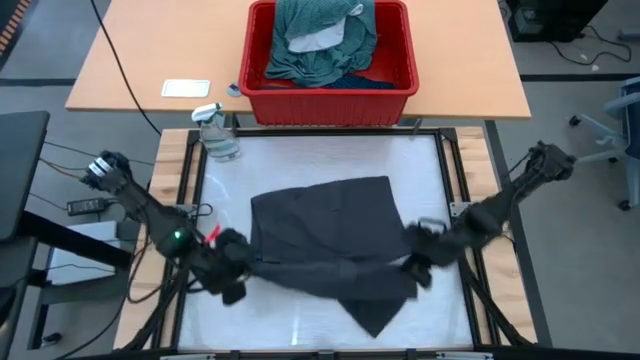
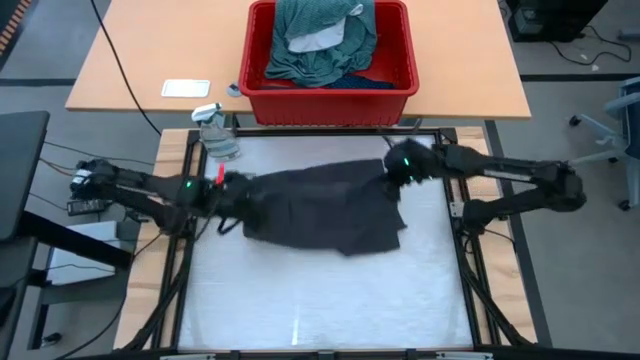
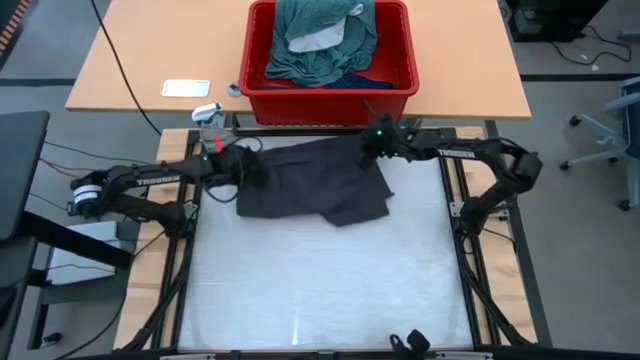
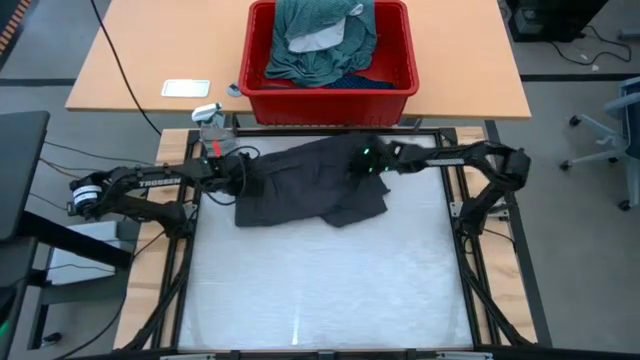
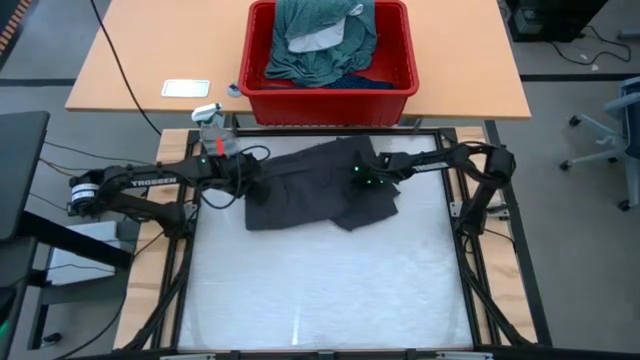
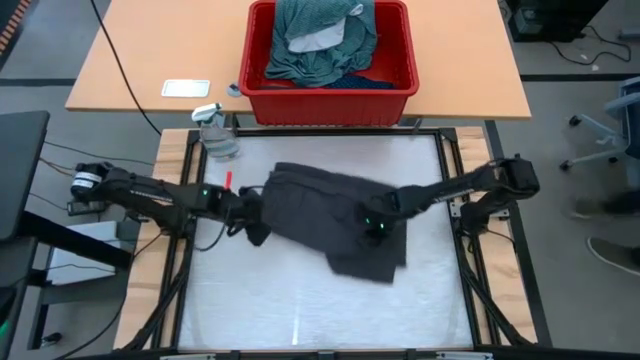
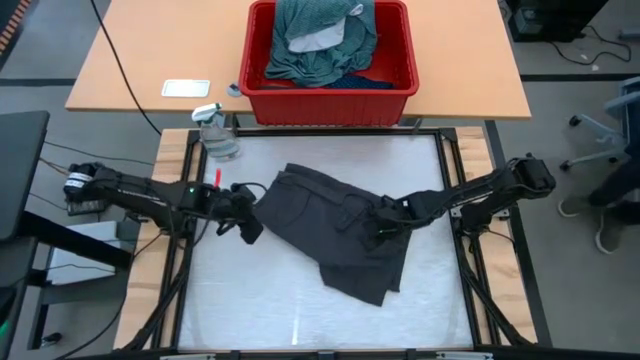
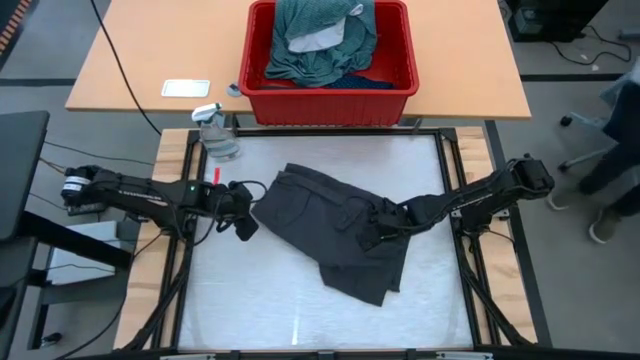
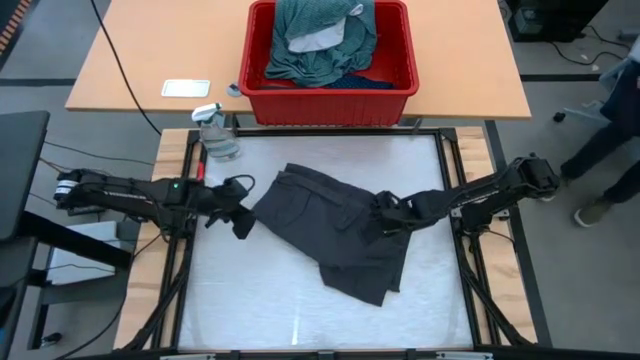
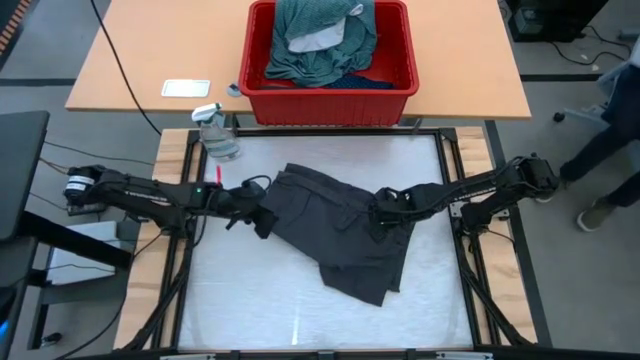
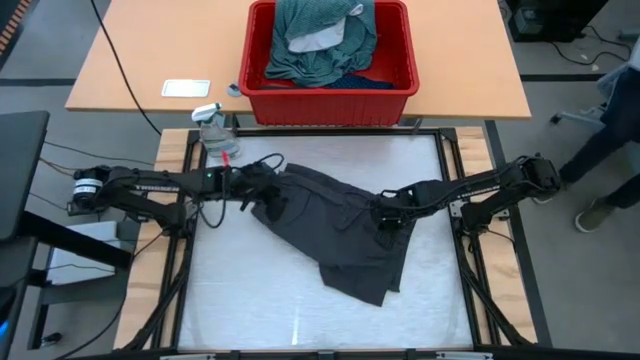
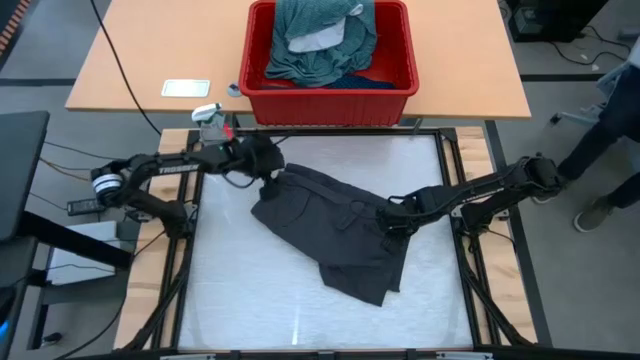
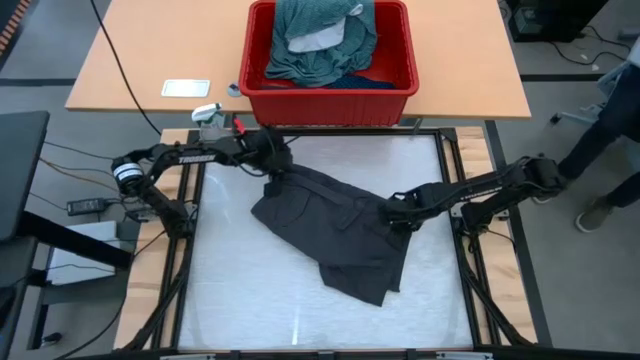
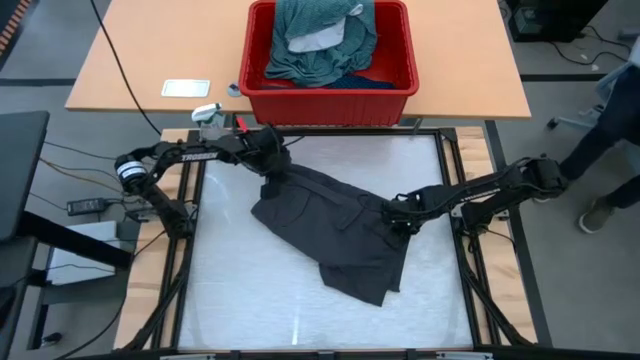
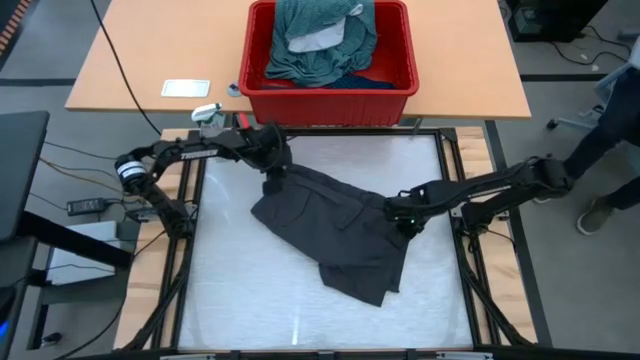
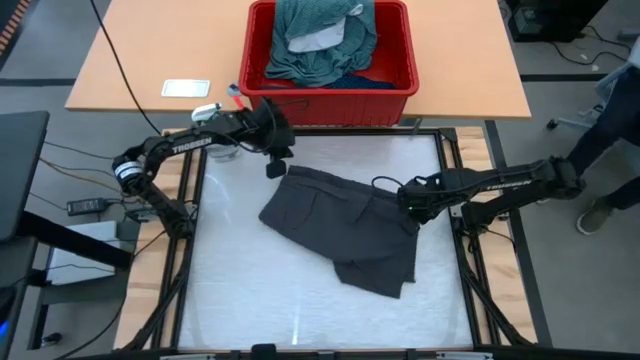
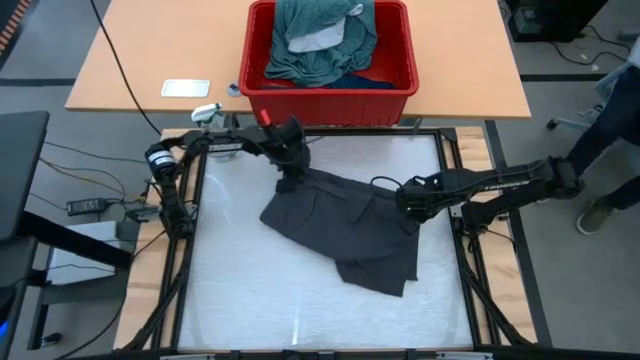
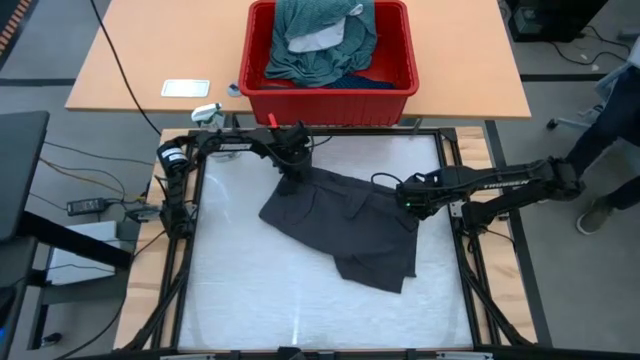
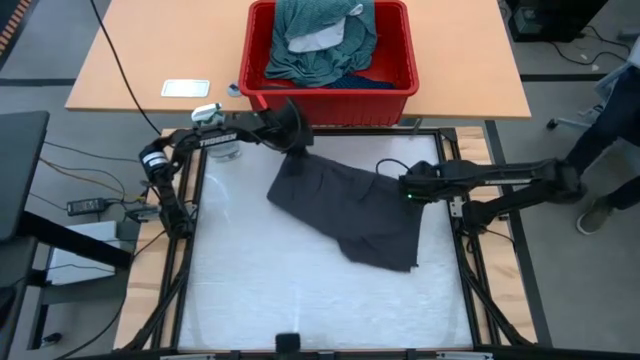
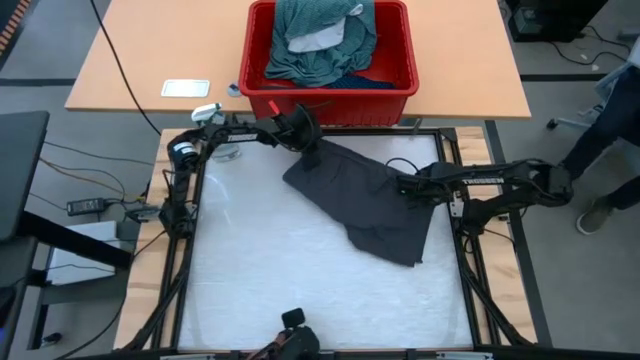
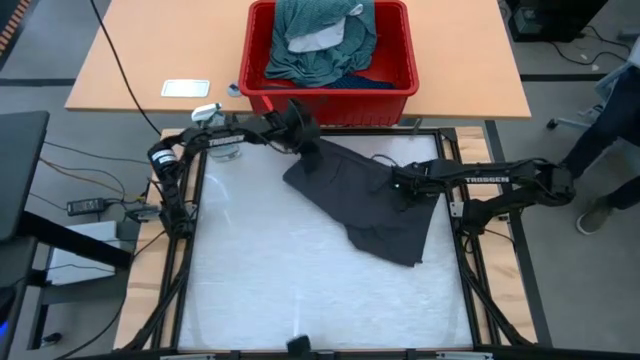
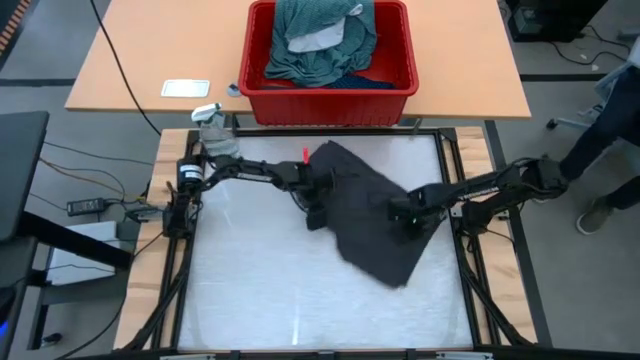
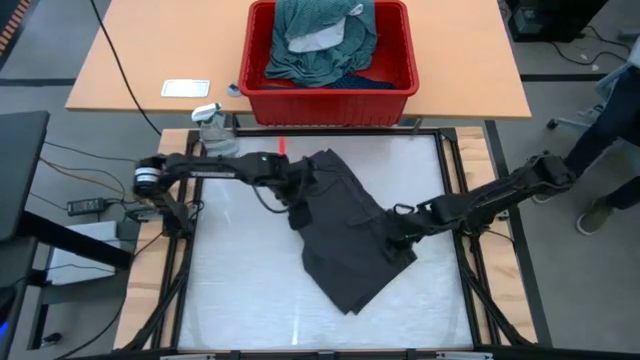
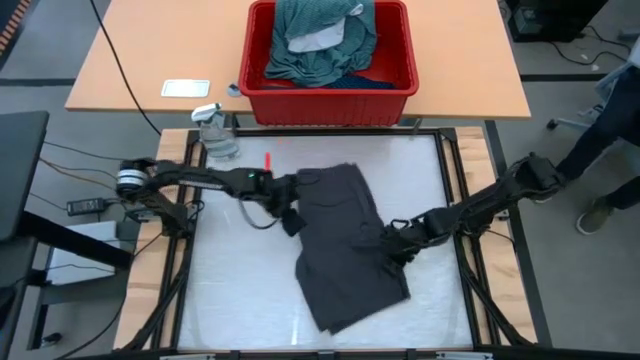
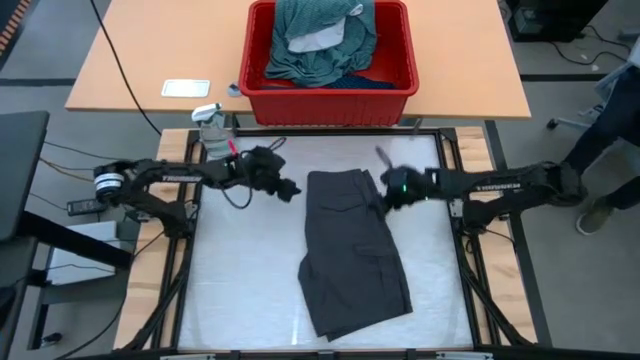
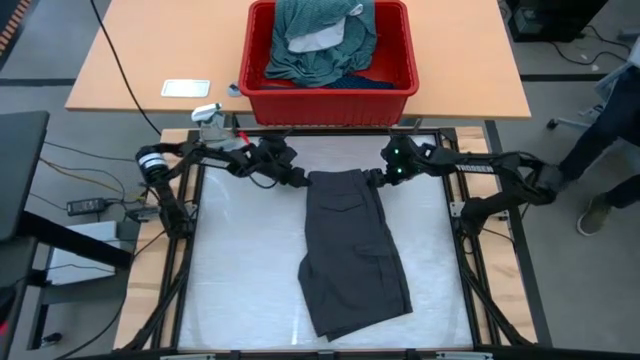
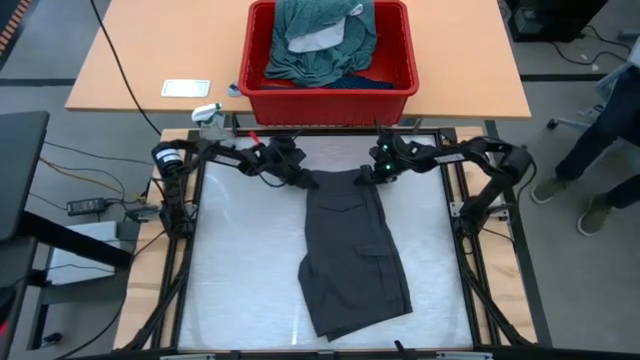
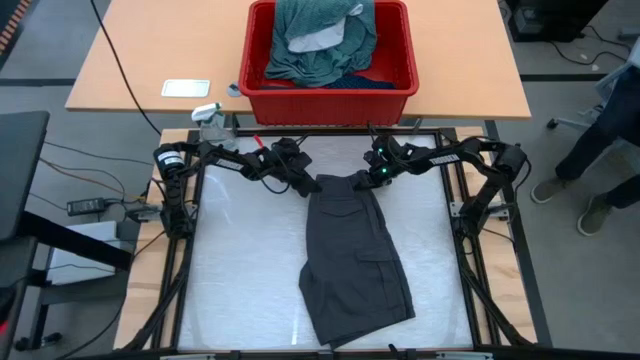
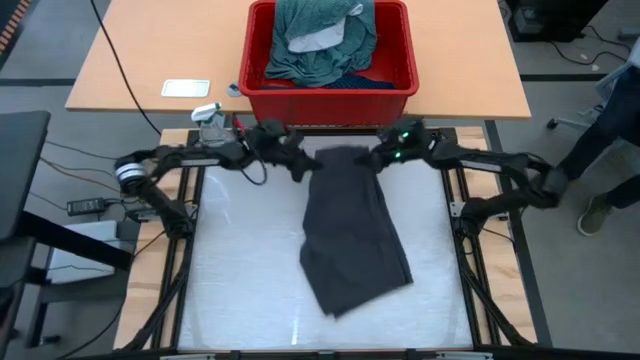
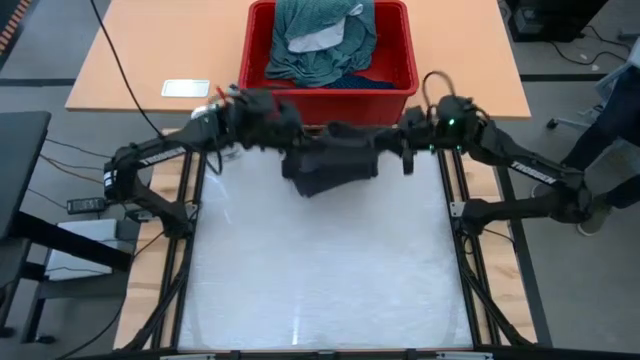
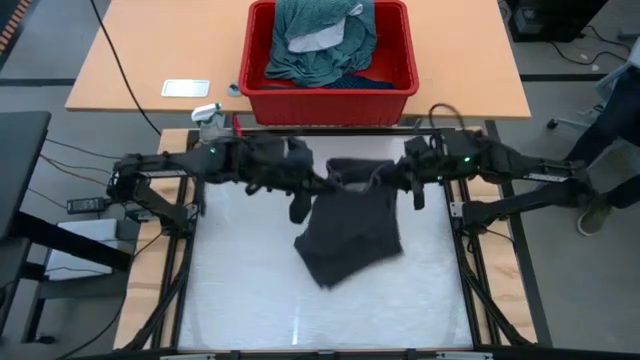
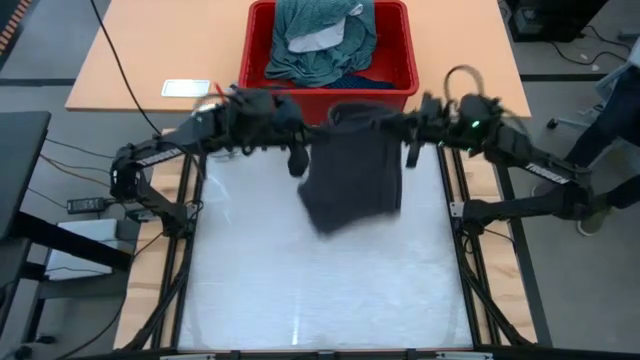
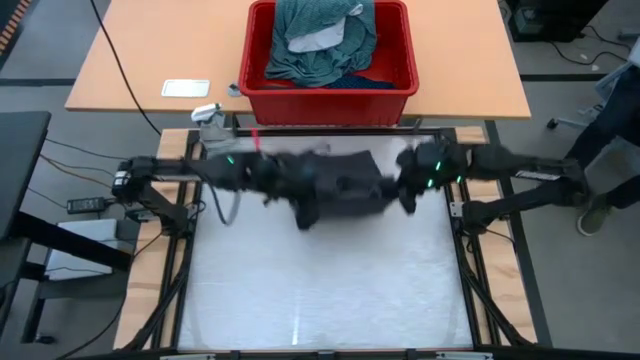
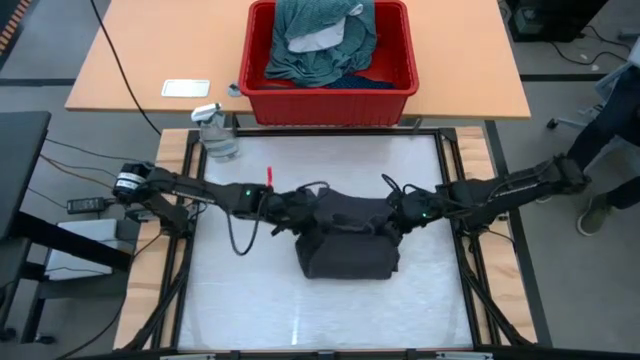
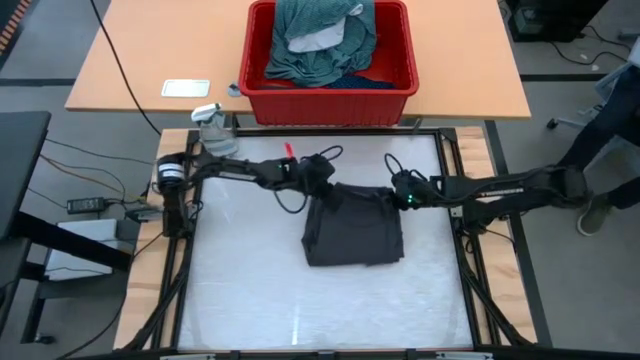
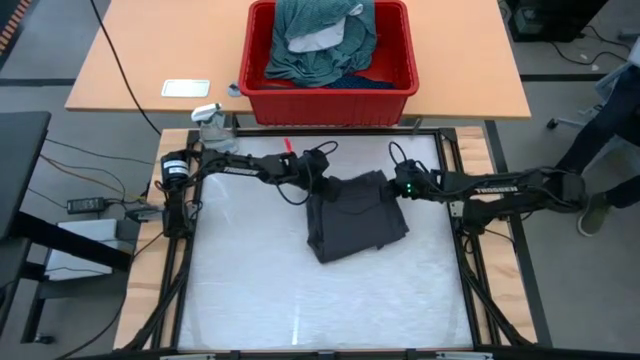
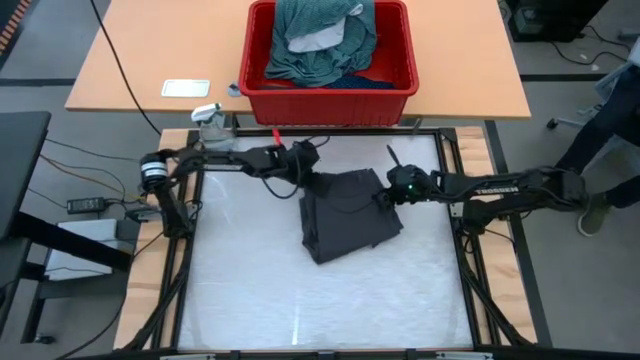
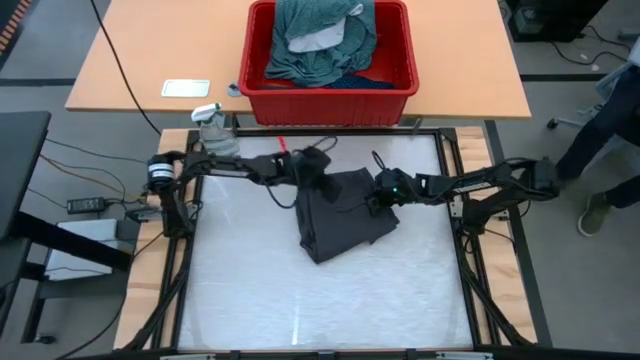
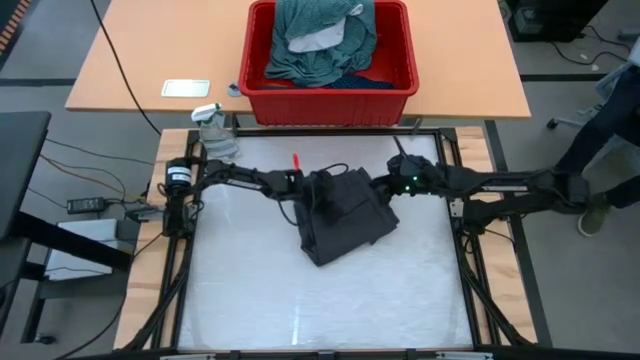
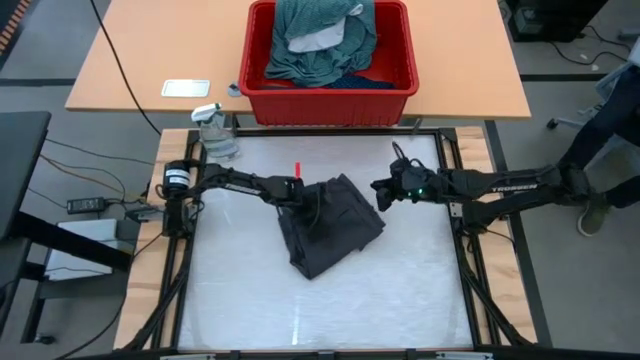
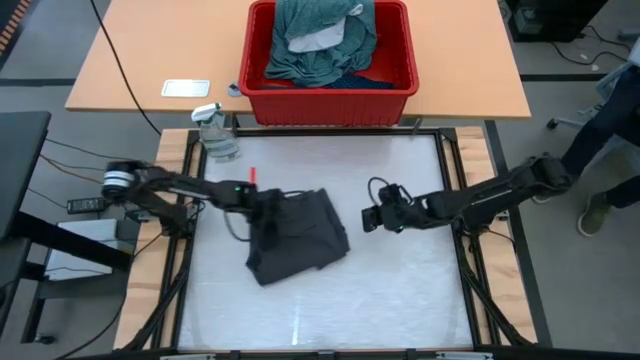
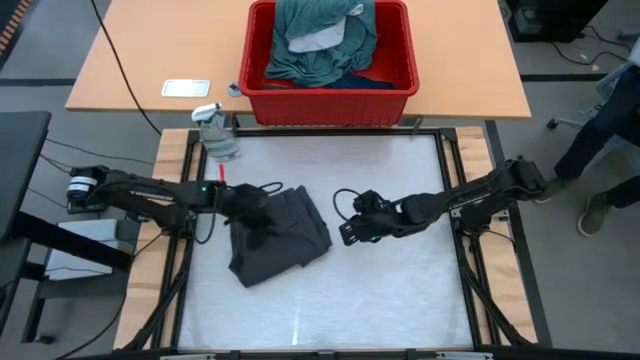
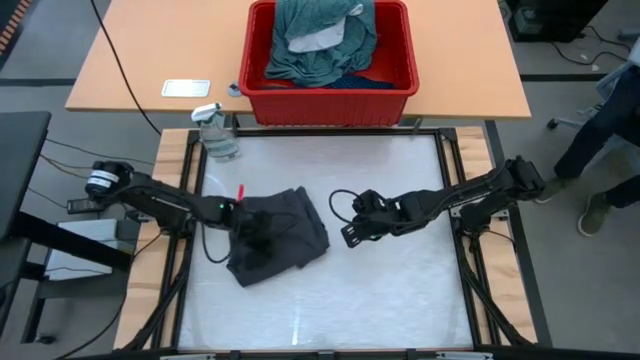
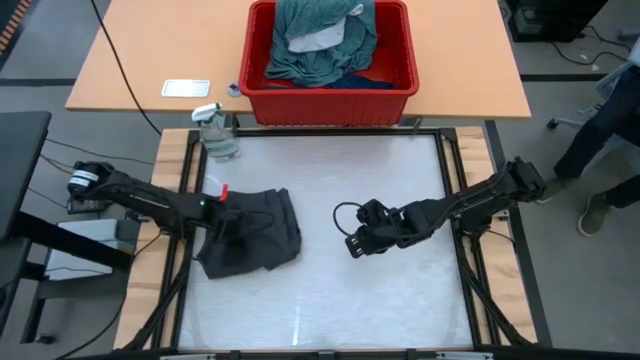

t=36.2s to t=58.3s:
Task: Fold Laundry from Bin
Fold the gray short on the table
